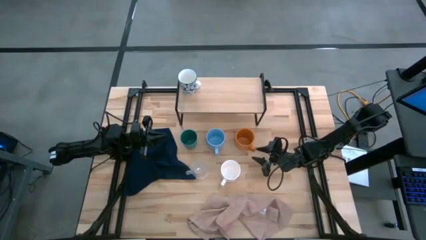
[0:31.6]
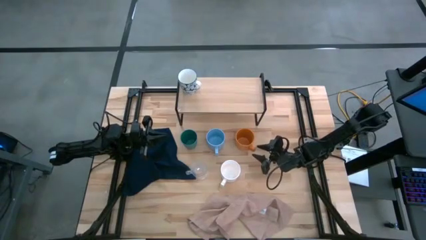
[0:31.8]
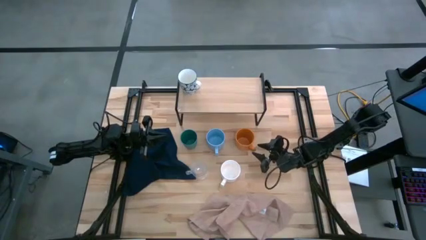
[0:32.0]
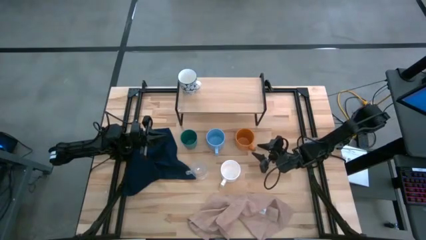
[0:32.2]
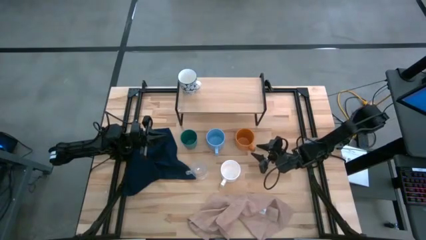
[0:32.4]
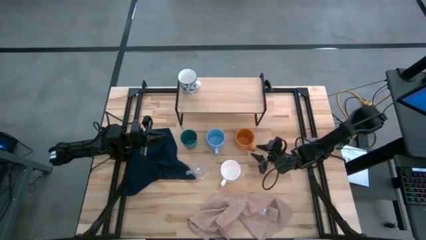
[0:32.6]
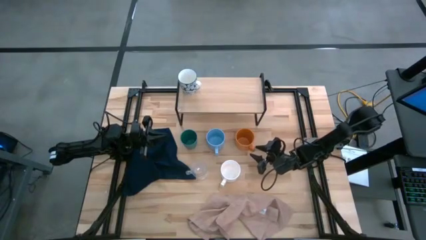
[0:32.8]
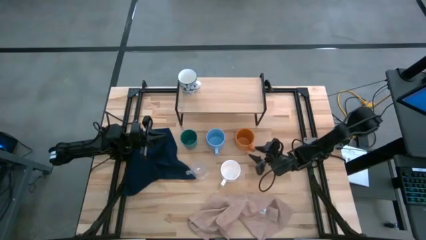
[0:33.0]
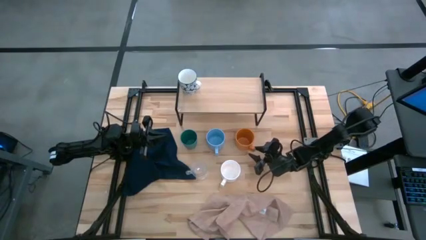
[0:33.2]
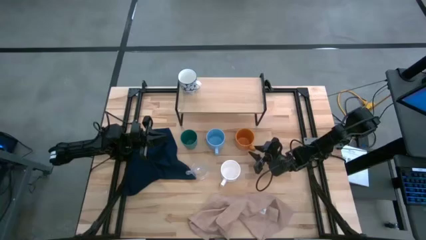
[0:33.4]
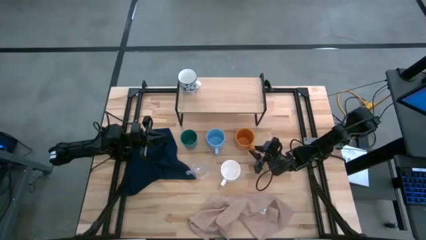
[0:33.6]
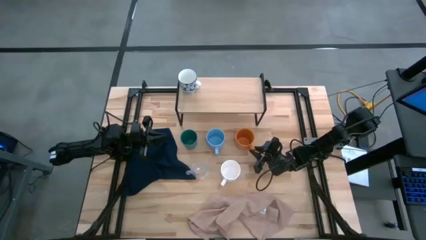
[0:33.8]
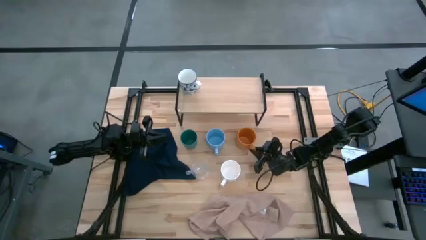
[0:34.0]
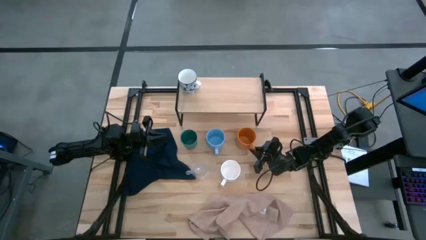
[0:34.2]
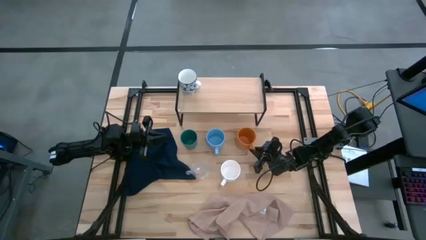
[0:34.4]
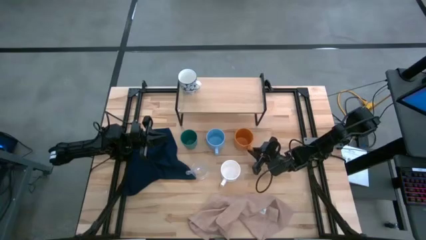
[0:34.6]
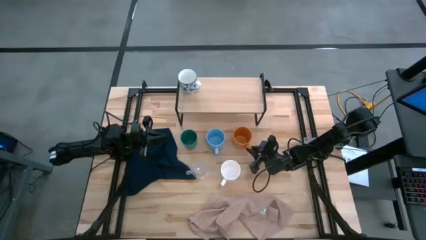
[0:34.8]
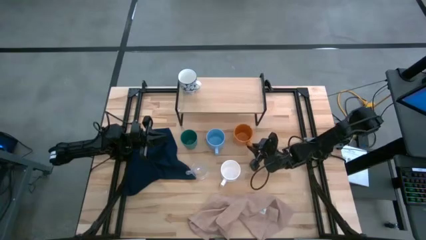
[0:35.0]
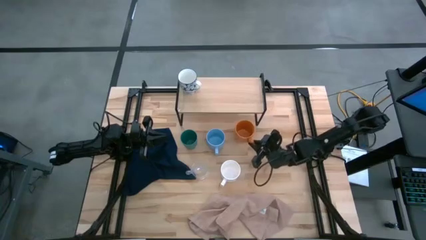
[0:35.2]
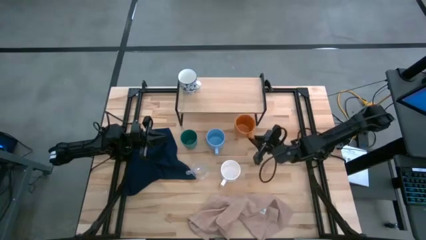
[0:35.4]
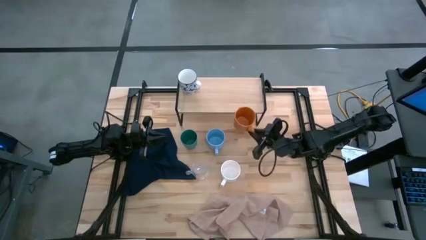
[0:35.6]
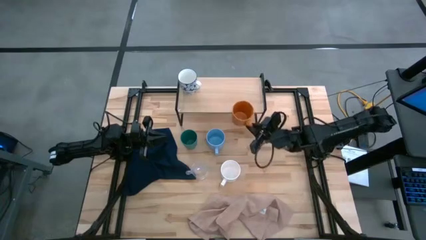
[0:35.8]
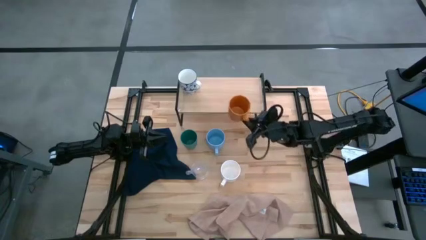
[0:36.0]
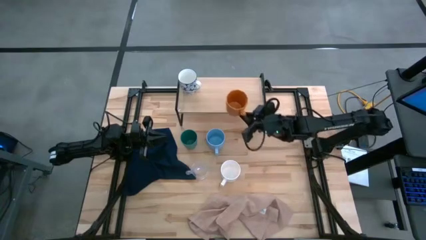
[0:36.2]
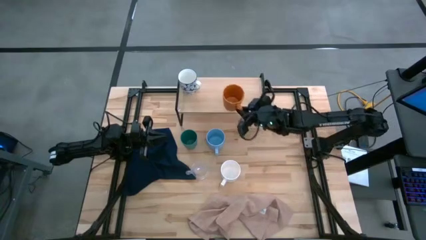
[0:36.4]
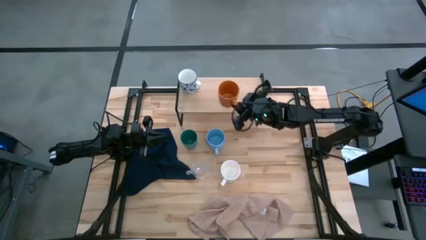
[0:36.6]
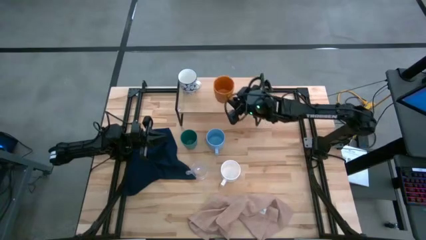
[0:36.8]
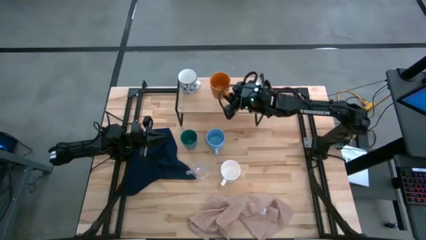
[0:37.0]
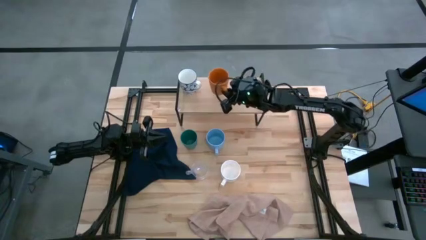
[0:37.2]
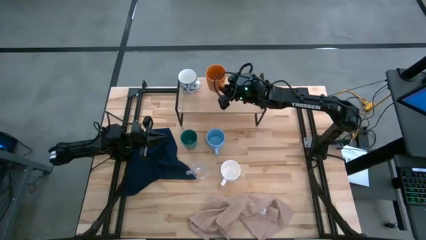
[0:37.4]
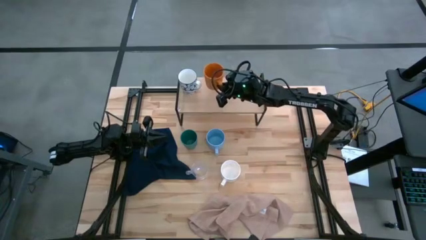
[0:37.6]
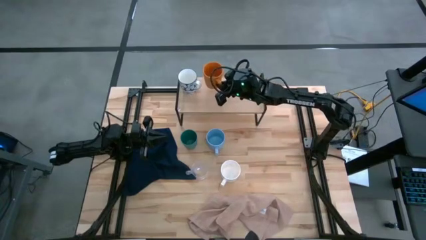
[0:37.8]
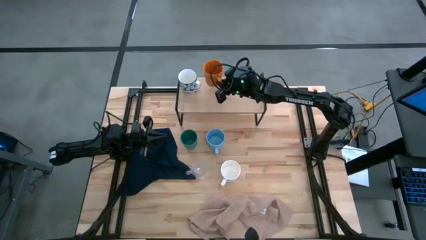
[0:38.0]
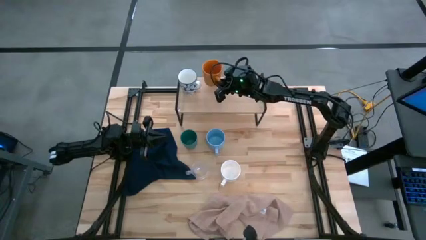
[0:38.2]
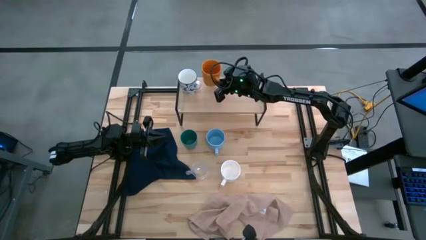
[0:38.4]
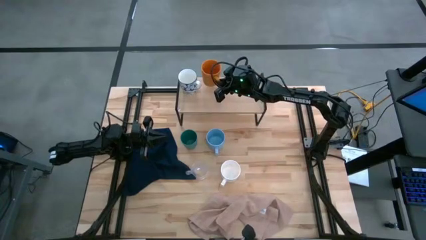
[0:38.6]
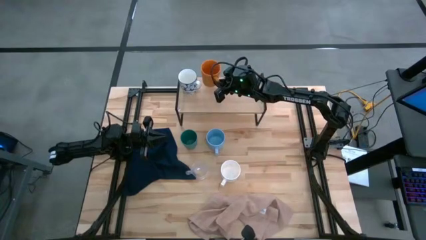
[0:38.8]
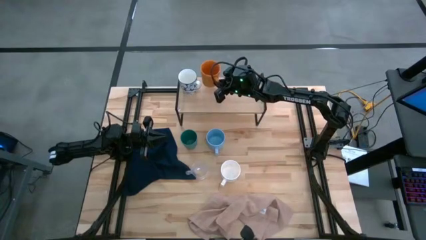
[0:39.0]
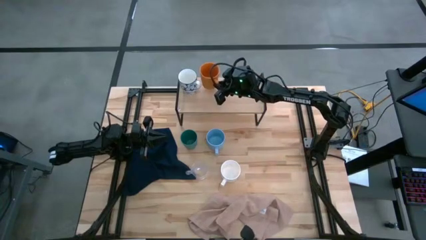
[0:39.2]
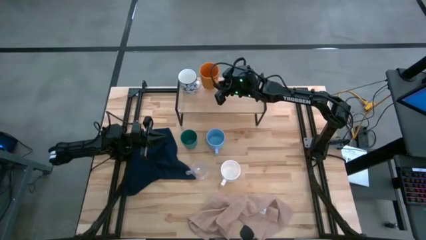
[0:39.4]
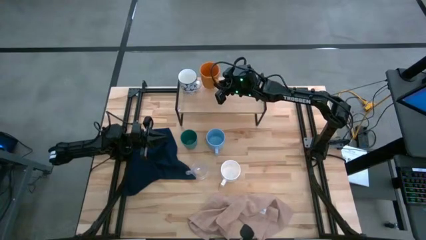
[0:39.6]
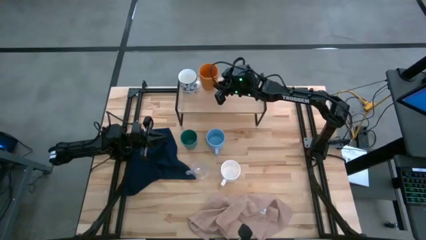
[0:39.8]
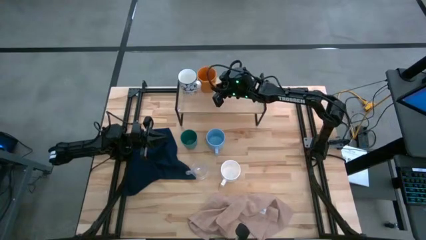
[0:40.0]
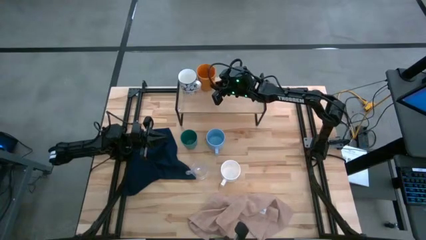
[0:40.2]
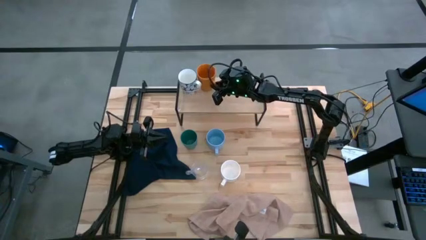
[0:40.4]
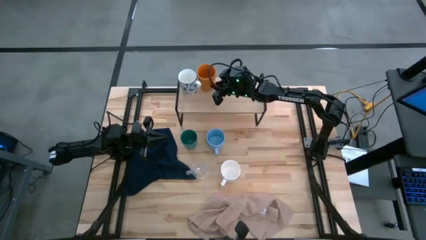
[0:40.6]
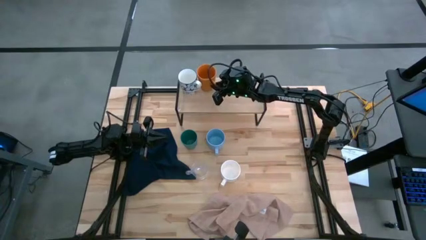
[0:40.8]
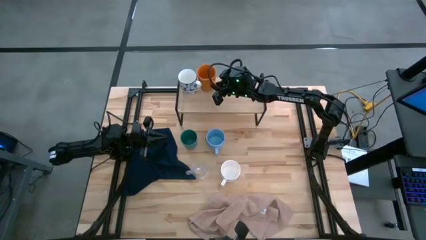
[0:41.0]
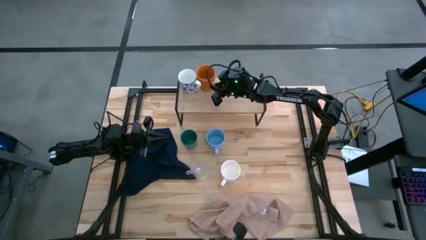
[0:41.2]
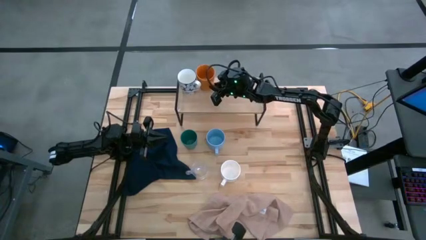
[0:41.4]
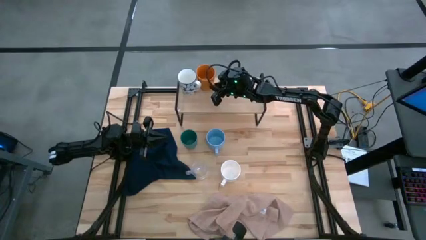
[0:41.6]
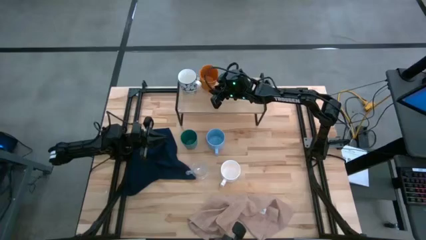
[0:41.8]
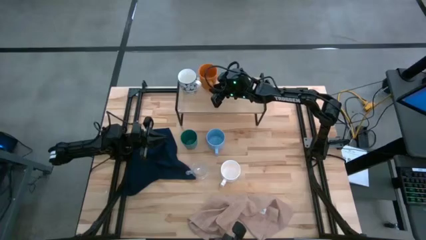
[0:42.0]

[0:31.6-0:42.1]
Task: Stack small to large cups/mugs on shelf
Put the orange mug on the shelf
